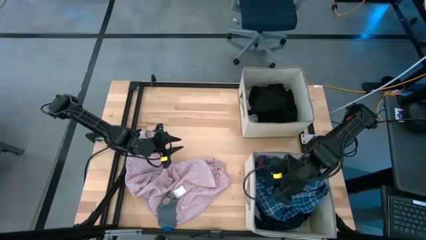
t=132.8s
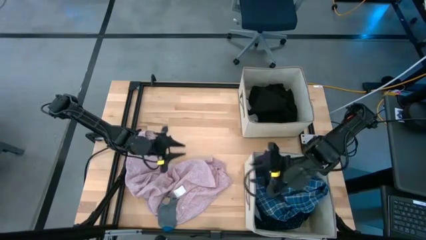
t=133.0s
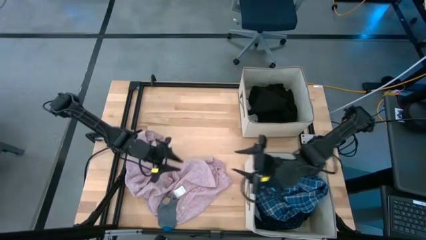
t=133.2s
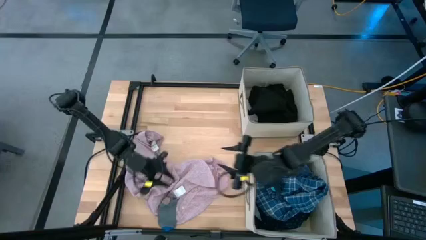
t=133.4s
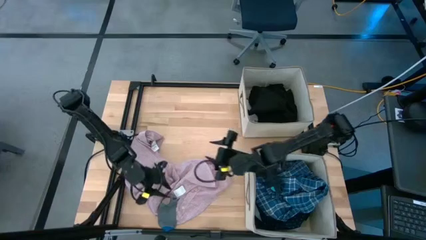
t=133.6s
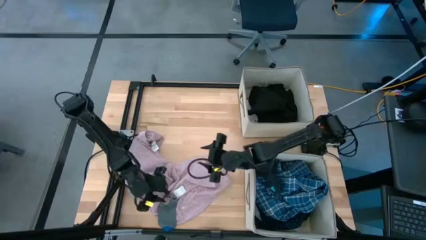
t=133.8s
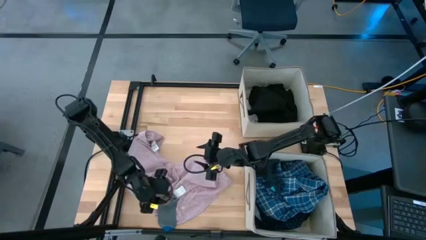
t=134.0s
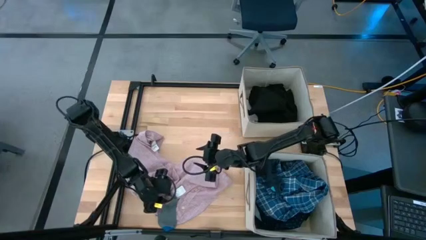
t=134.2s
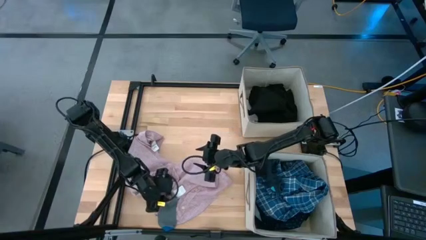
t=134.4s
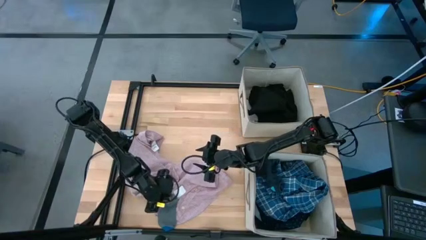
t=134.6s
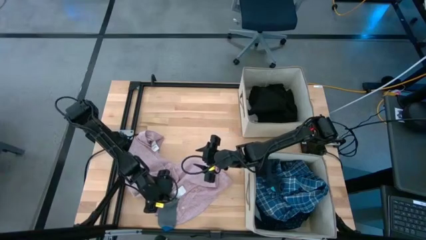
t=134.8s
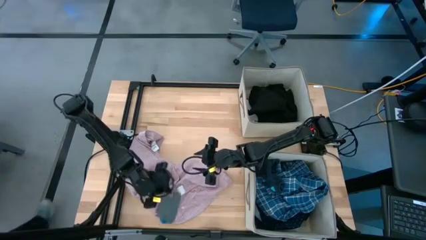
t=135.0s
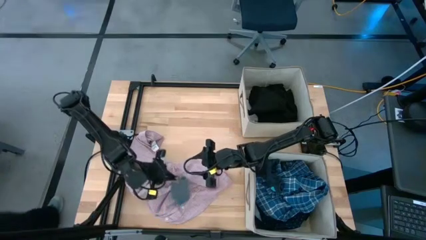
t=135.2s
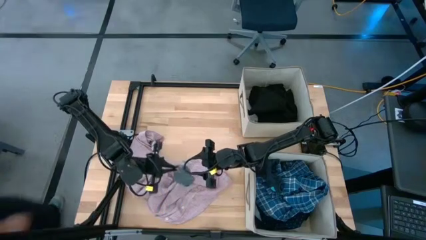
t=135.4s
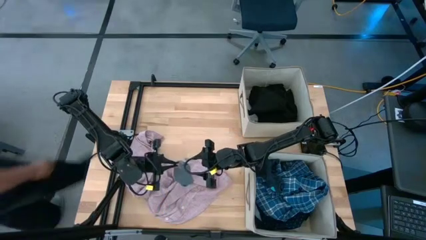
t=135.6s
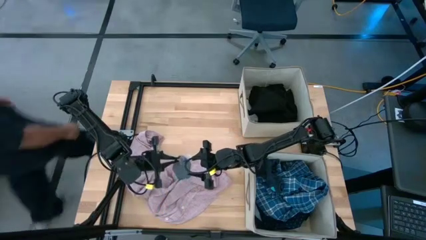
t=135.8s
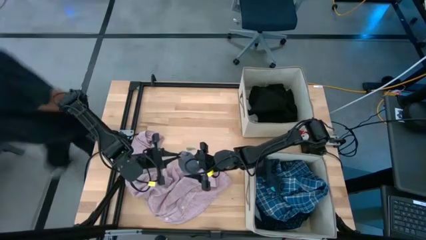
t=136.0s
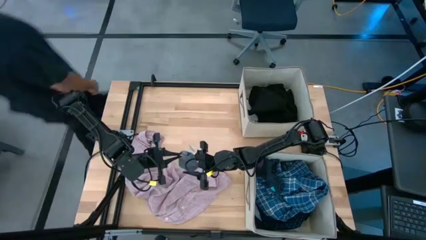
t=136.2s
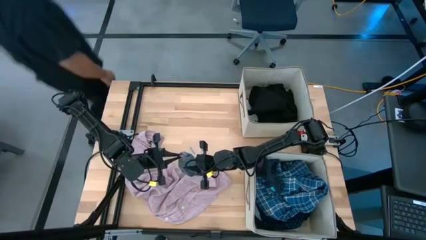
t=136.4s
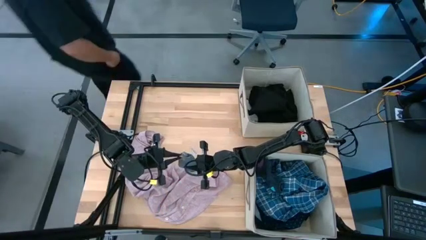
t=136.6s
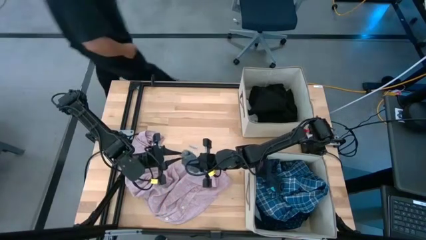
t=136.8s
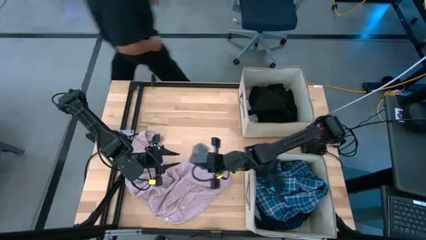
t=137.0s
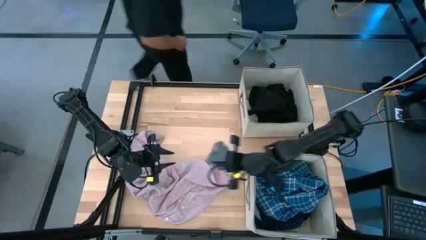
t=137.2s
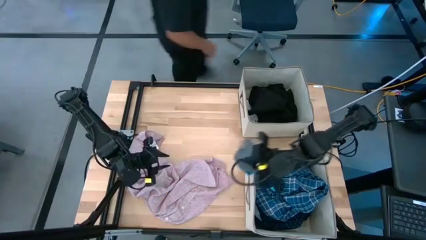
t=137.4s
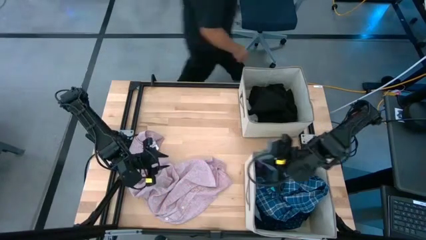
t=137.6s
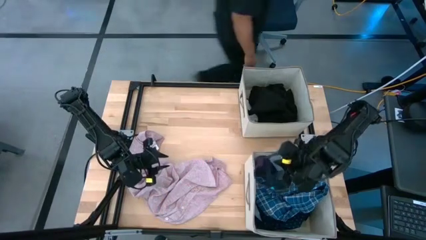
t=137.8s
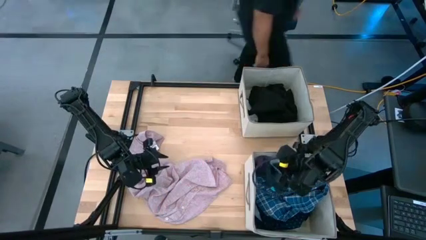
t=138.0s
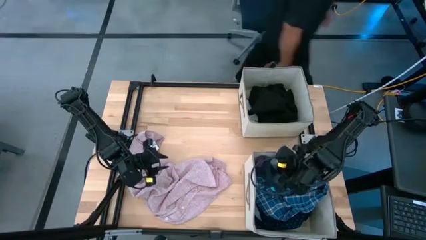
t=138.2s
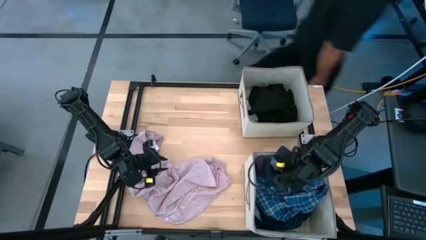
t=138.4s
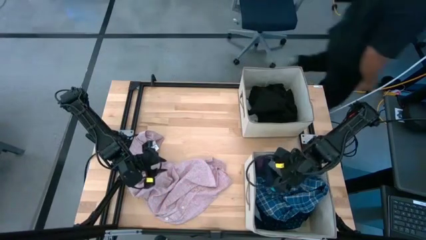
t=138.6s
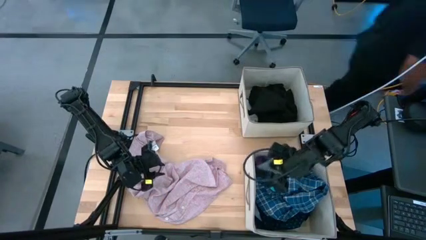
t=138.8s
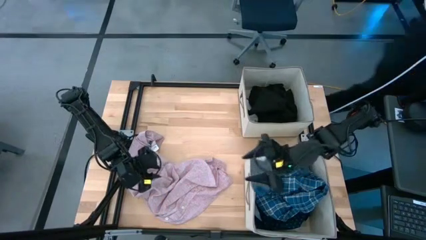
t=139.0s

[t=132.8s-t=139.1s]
Task: Sort clothes
Put the gray sock into the bottom laundry organizer

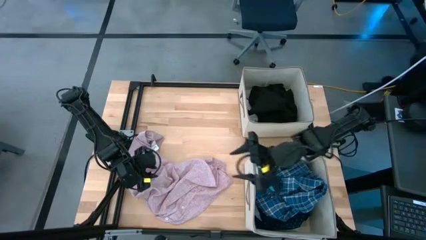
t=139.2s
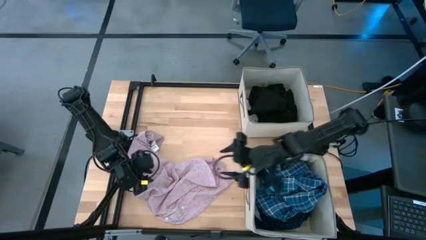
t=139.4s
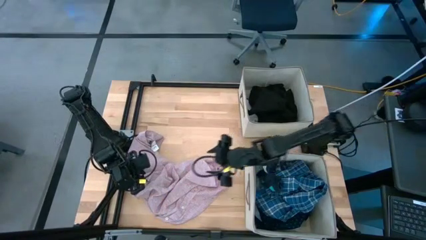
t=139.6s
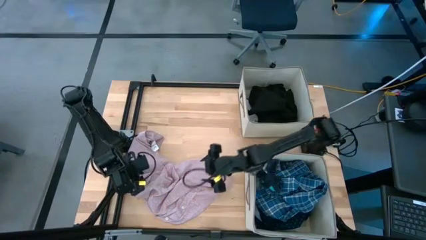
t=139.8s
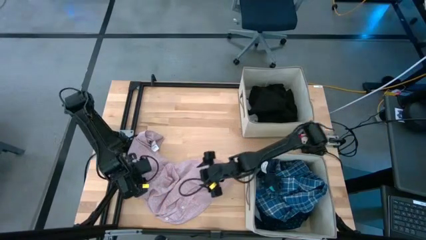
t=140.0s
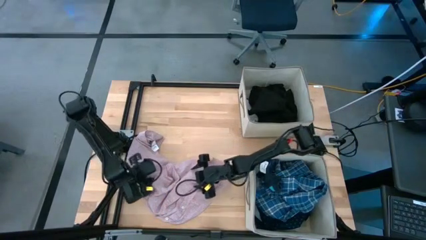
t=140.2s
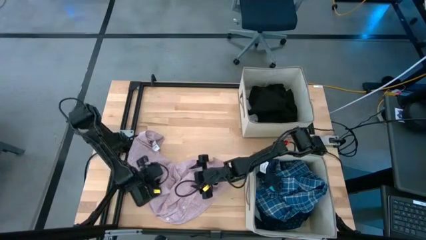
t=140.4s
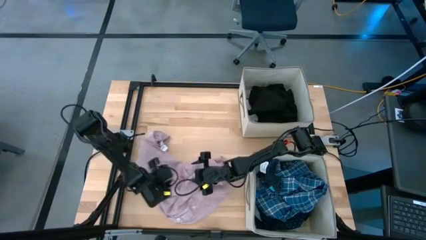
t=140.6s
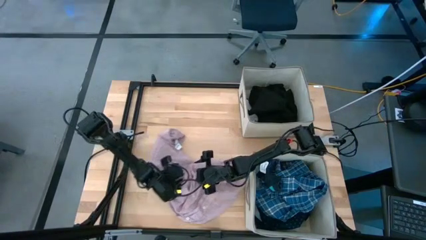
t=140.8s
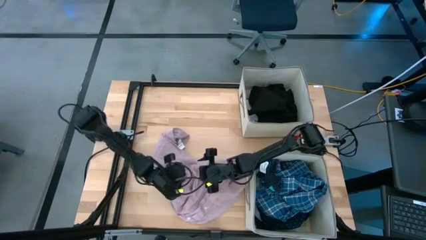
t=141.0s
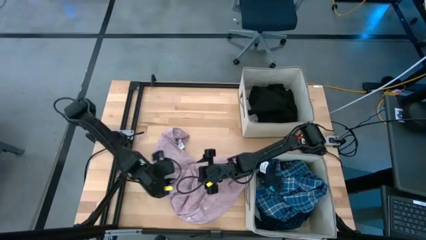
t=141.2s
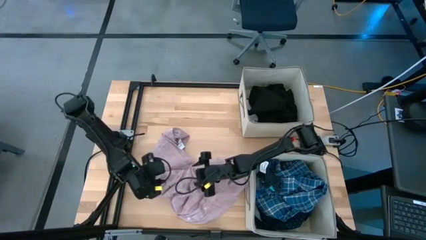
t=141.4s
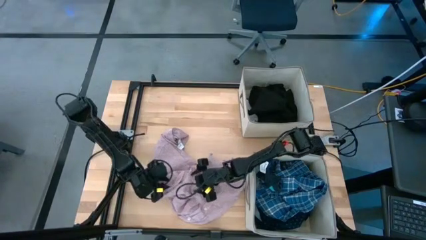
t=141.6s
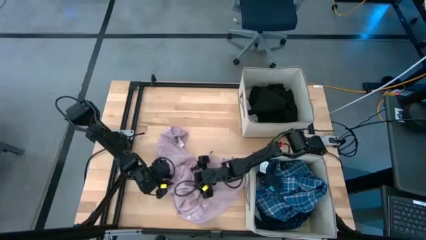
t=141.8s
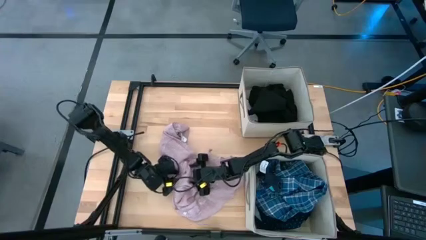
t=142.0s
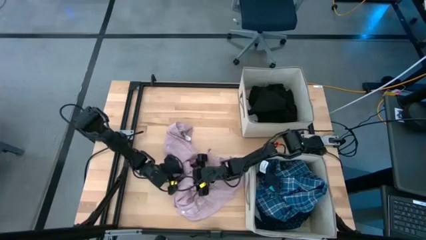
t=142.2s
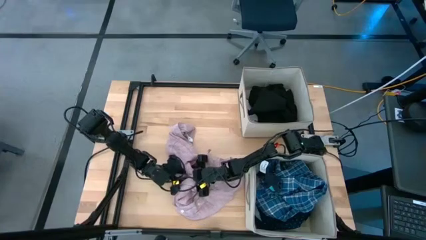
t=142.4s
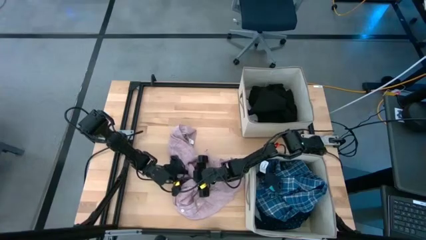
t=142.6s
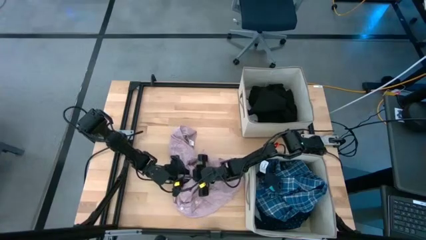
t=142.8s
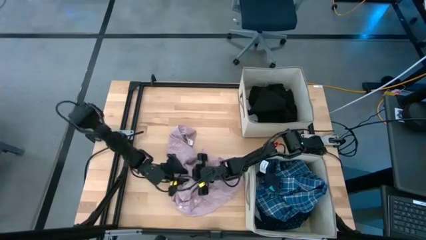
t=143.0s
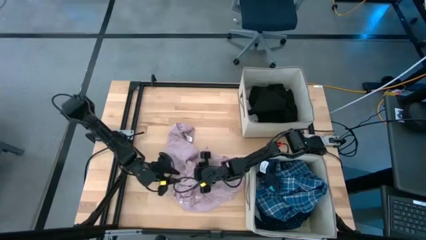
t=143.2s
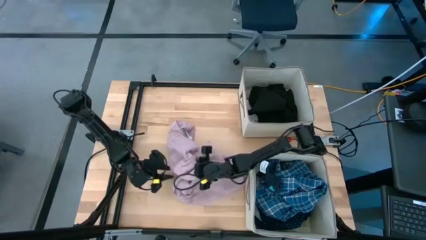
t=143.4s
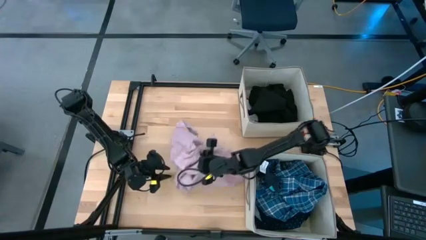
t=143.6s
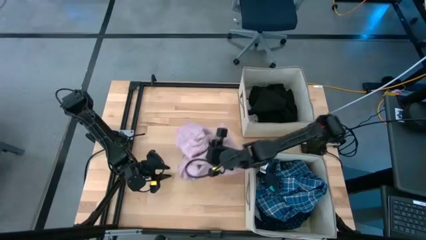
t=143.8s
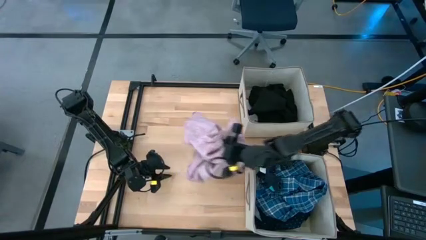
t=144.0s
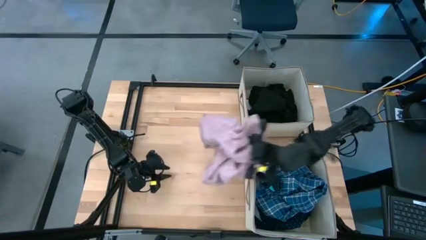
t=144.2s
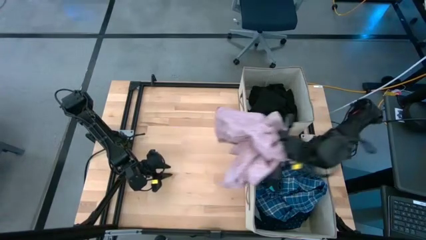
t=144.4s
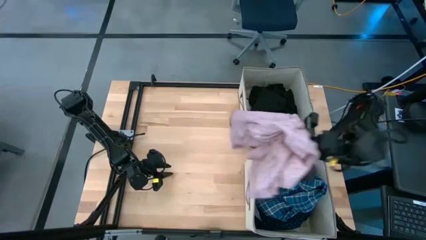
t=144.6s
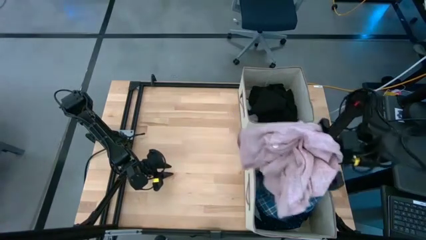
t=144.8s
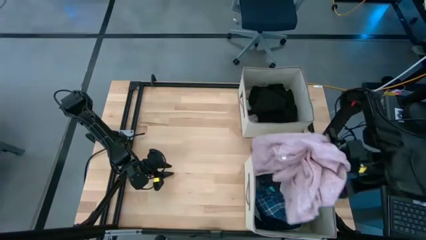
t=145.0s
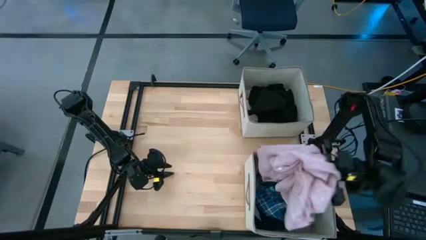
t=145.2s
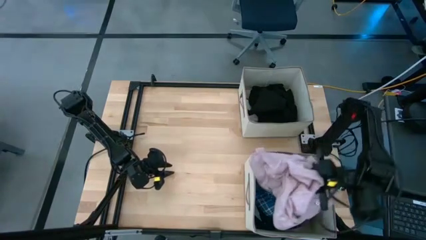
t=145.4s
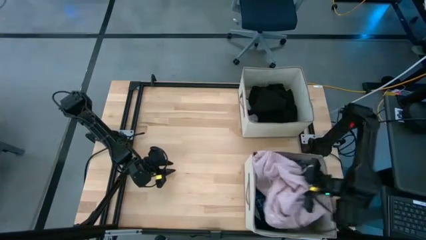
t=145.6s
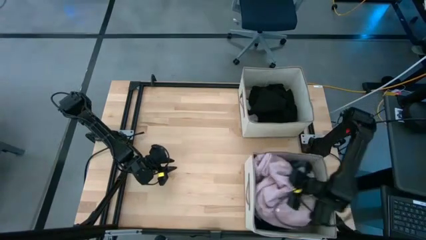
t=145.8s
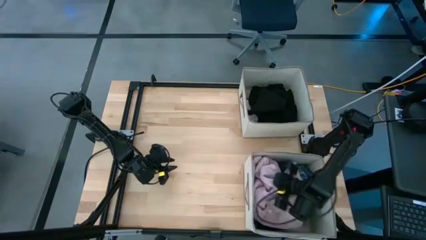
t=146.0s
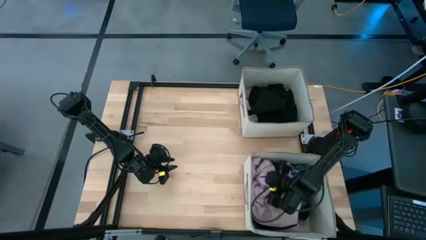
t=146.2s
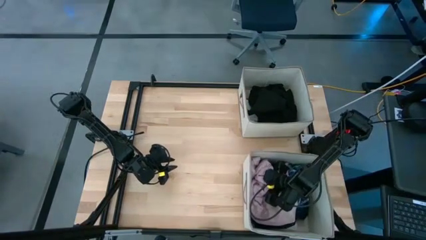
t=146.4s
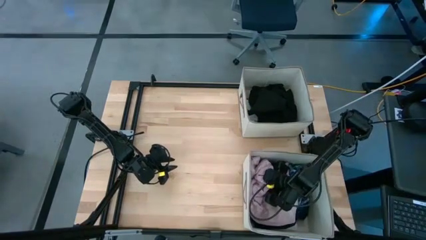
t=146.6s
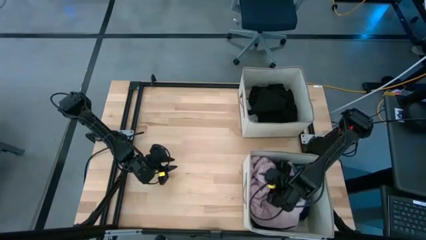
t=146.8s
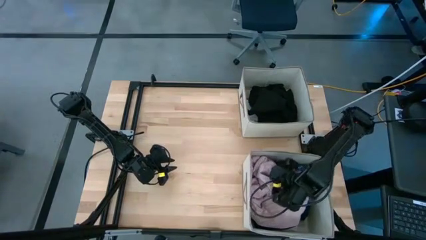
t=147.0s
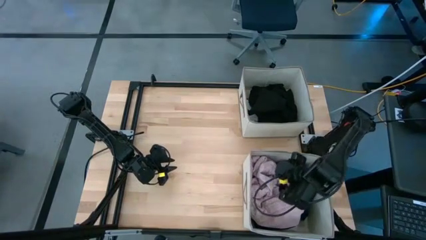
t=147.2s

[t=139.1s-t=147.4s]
Put the pink polo shirt into the bottom laundry organizer

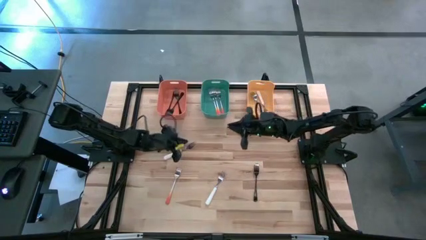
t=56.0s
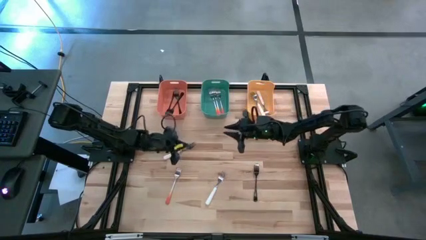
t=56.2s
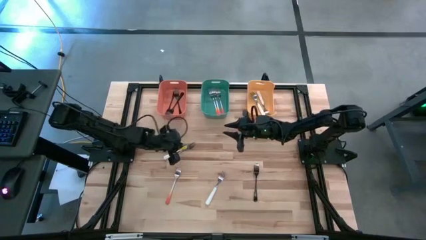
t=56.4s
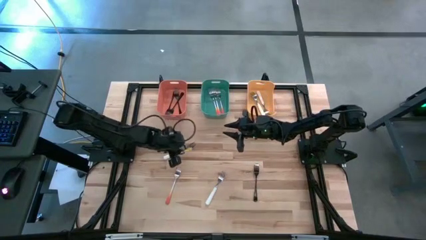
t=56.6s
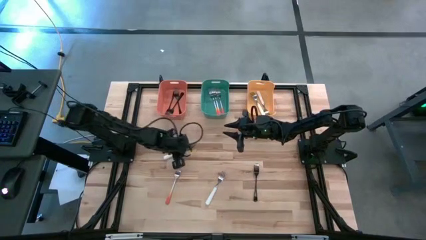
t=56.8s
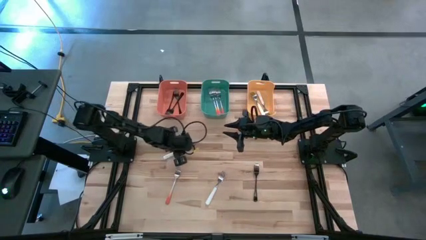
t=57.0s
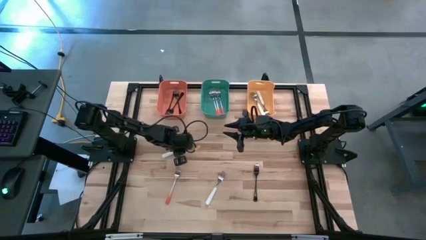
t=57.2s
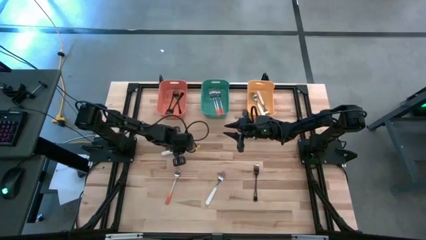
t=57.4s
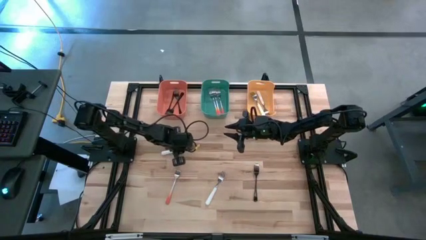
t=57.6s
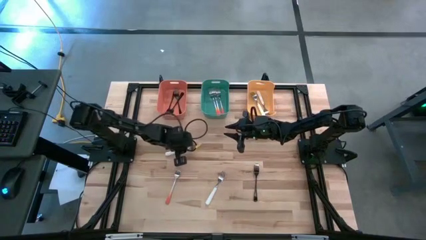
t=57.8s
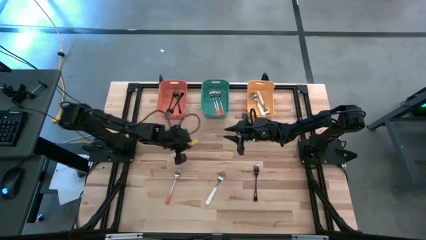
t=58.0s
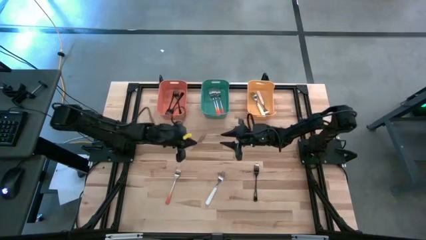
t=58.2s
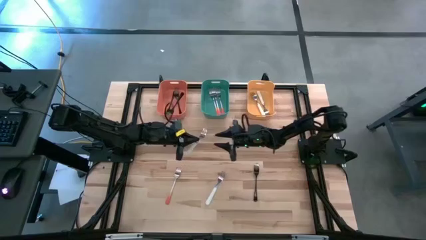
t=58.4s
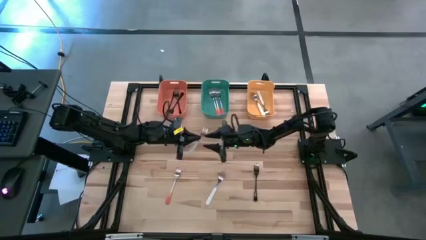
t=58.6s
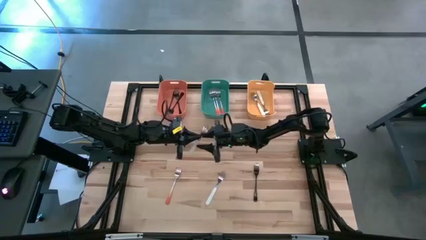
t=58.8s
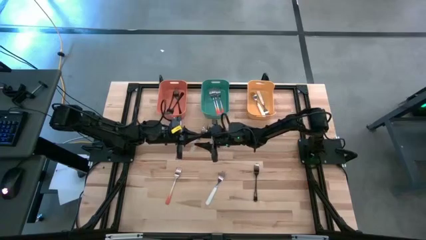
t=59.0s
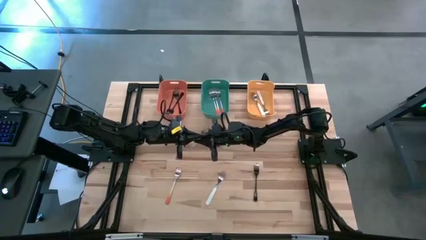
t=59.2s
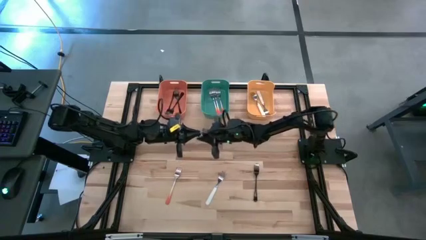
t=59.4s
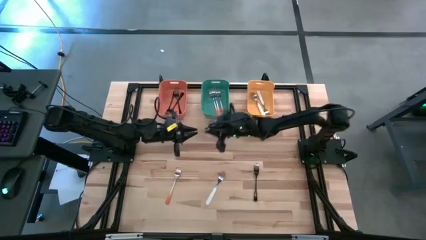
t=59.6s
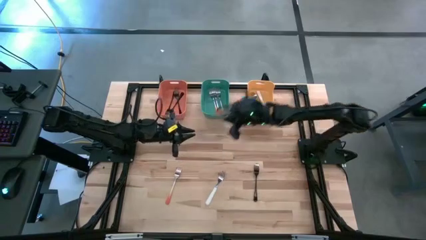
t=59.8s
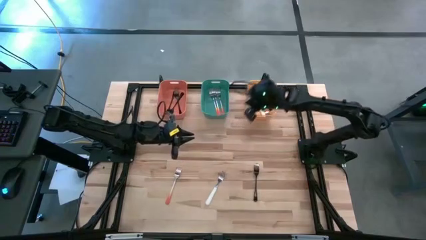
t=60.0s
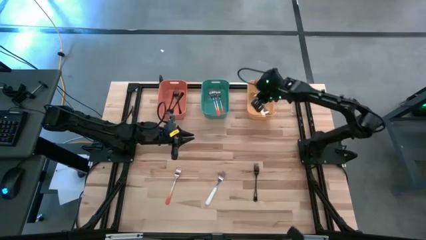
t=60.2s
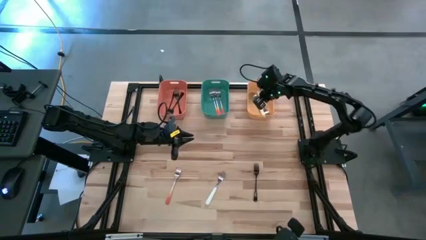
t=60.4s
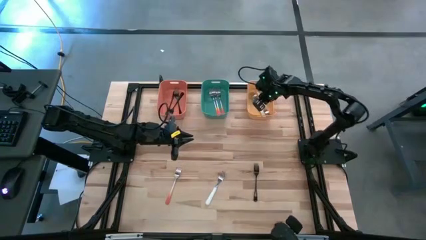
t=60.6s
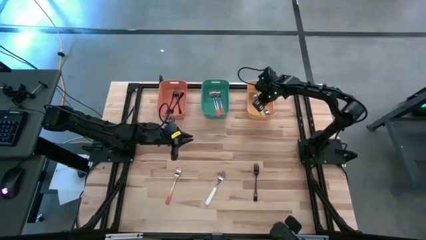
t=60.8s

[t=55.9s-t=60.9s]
Task: Sort silverware by color (type)
Put the top white fork into the yellow bin
